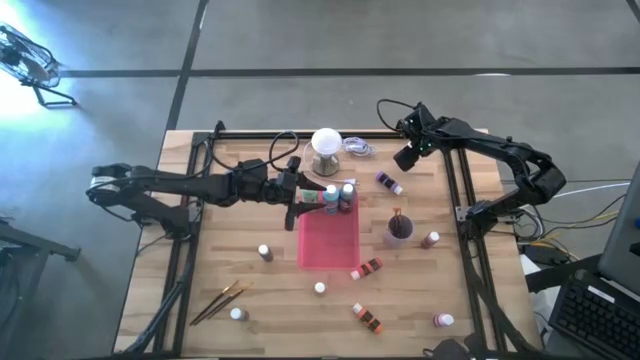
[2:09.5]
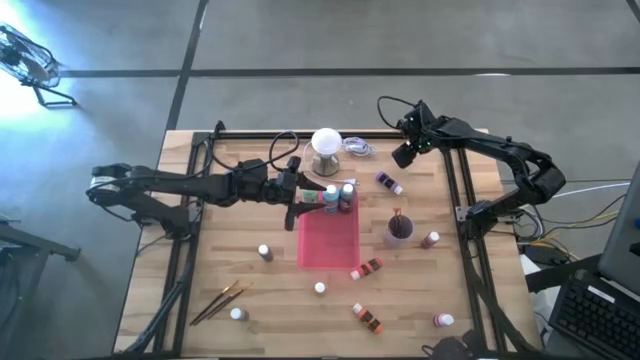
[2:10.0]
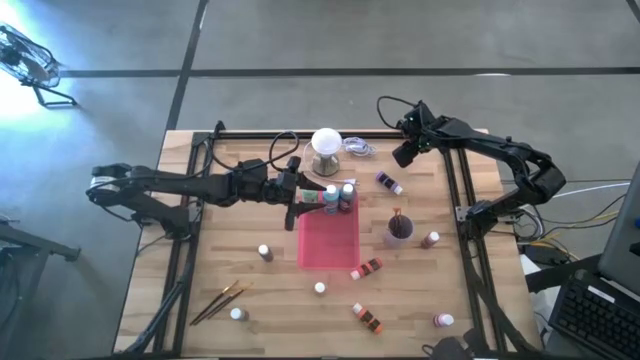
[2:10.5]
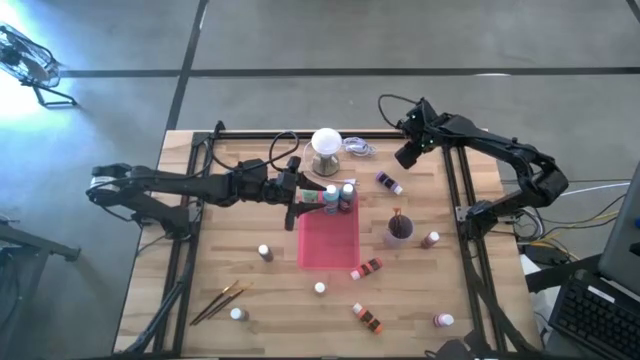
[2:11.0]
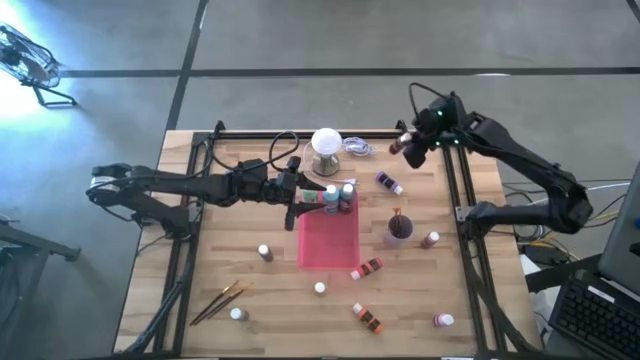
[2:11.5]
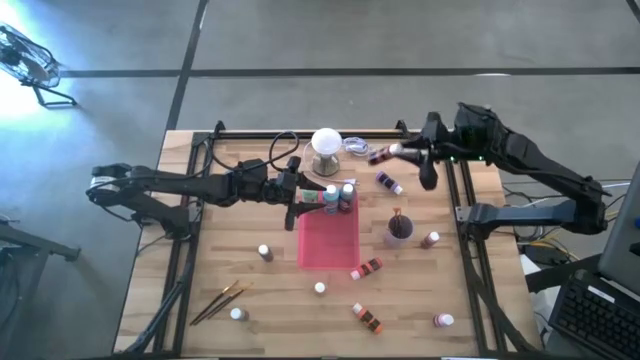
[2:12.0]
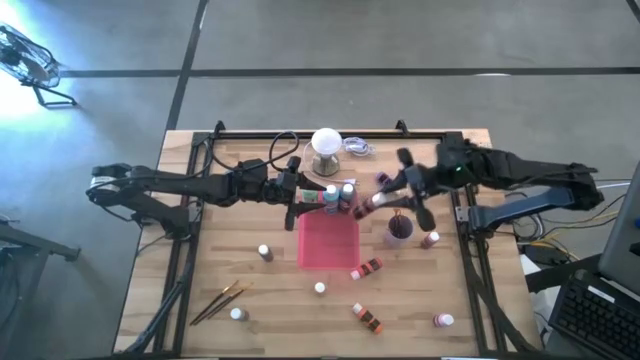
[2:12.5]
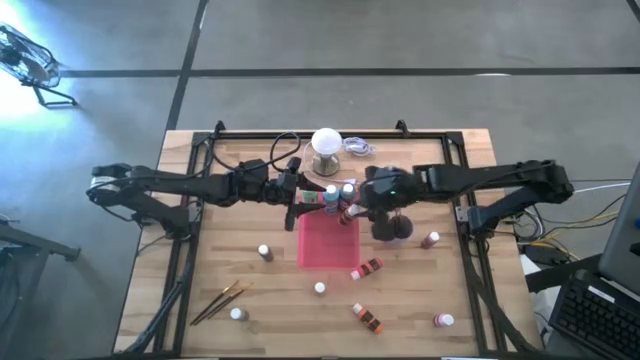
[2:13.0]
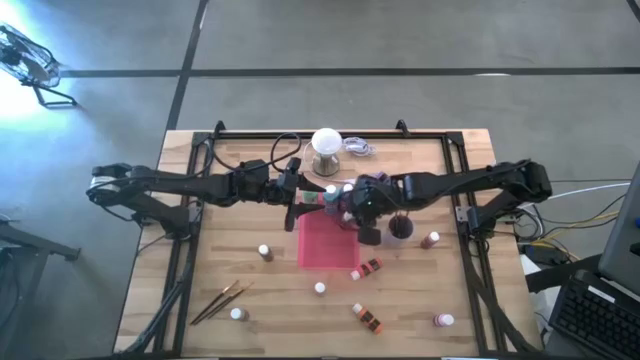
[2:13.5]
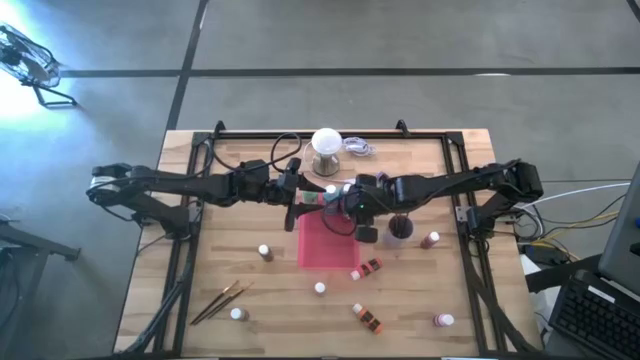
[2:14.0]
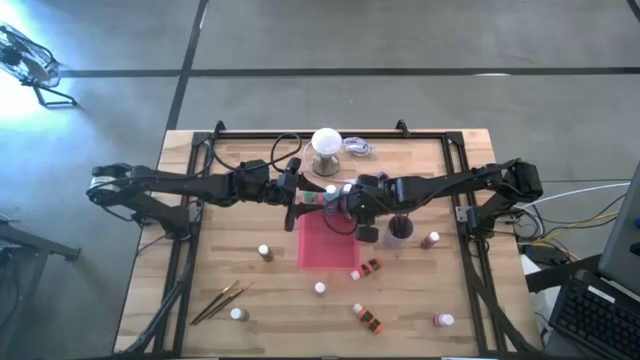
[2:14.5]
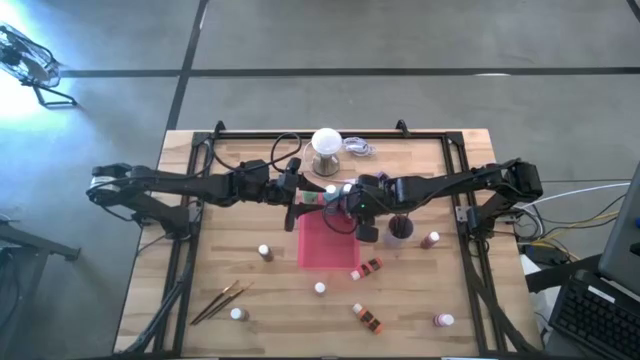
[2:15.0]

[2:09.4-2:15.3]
Task: Pick & Place Paint Supplies
Put the small red paint bottle into the red bin

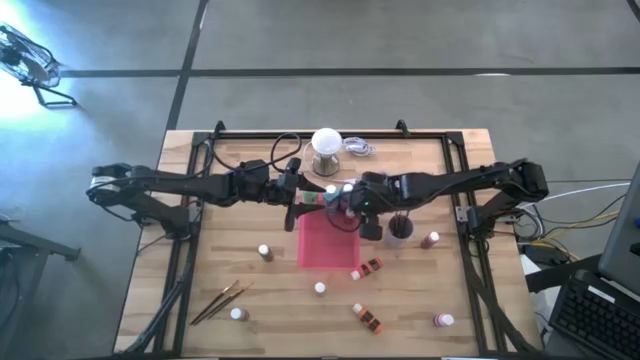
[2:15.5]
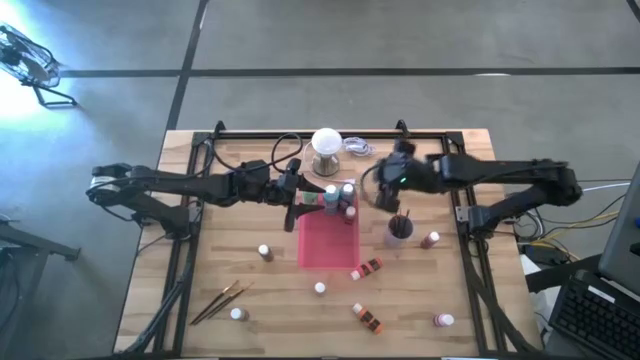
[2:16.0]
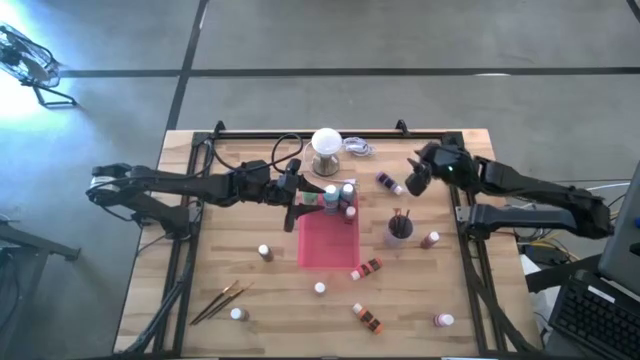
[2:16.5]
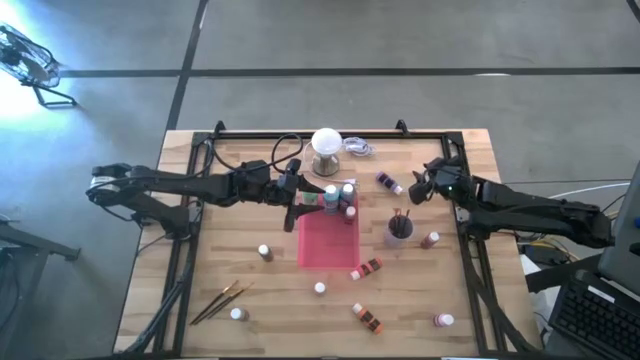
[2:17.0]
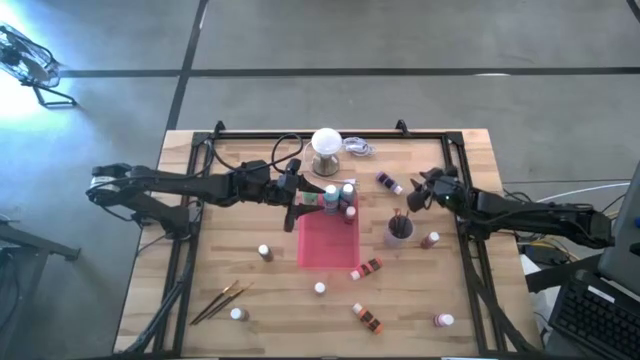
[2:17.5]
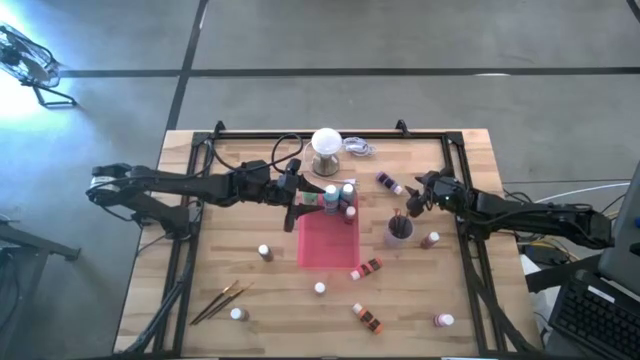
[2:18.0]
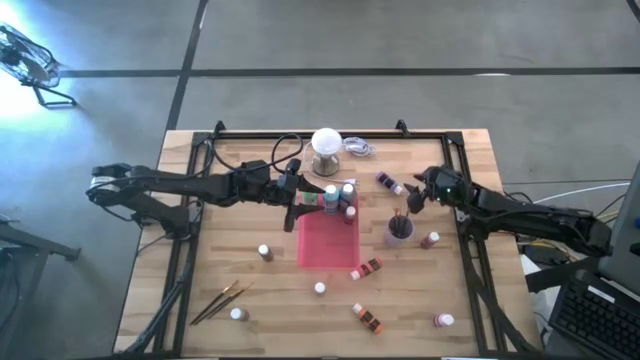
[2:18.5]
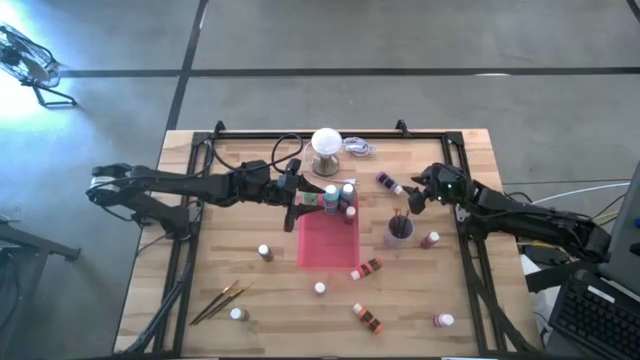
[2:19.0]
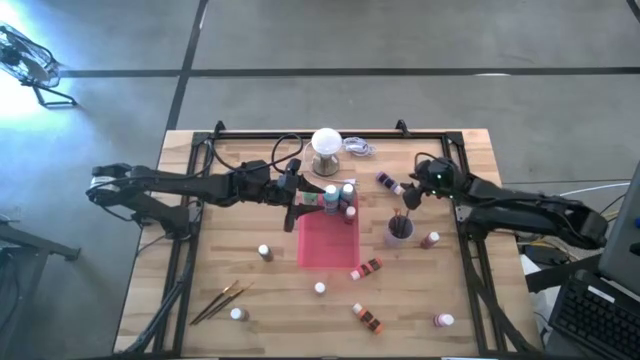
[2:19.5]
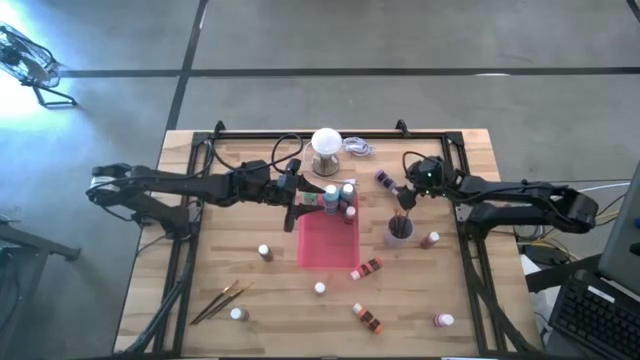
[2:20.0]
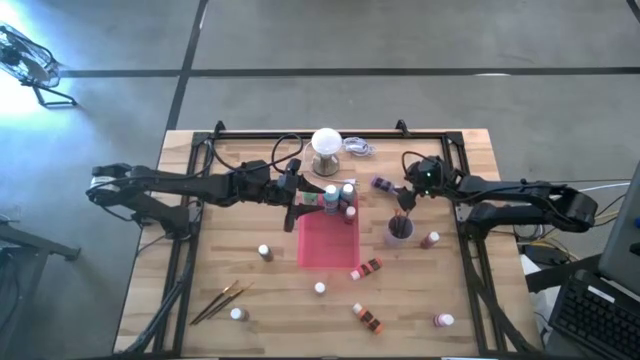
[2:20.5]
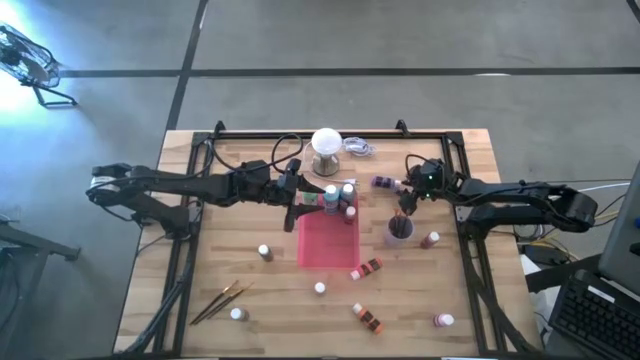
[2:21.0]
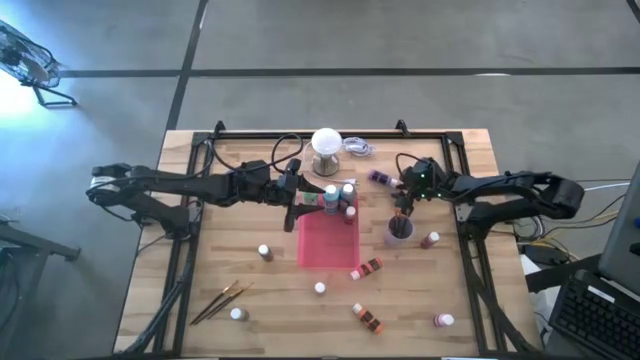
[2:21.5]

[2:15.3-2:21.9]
Put the small purple paint bottle into the red bin

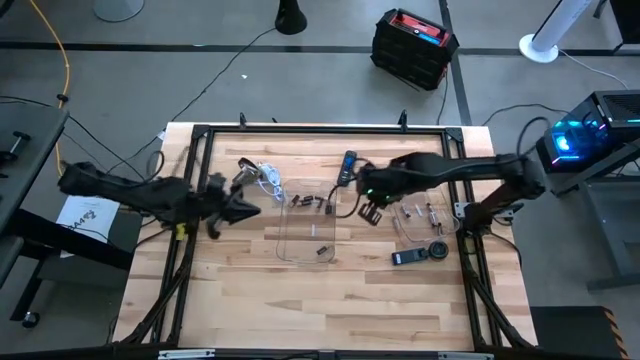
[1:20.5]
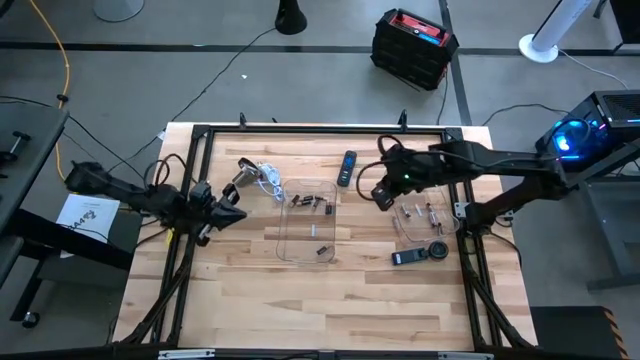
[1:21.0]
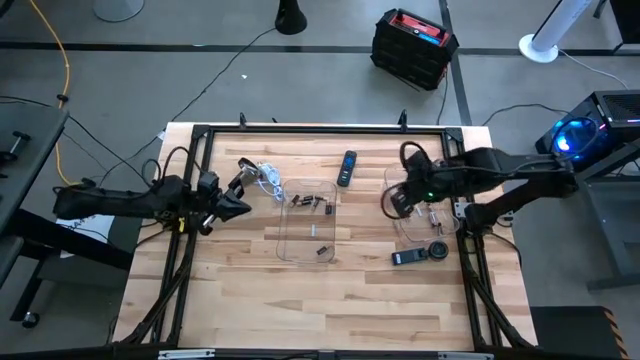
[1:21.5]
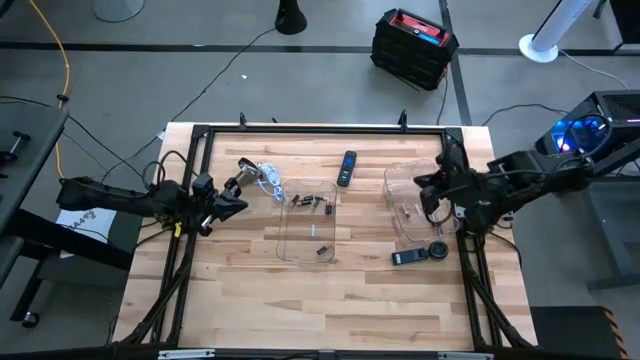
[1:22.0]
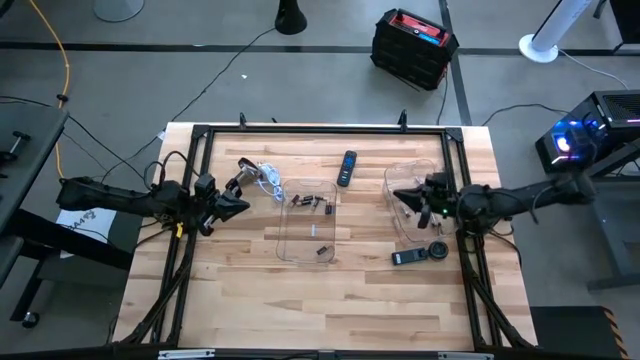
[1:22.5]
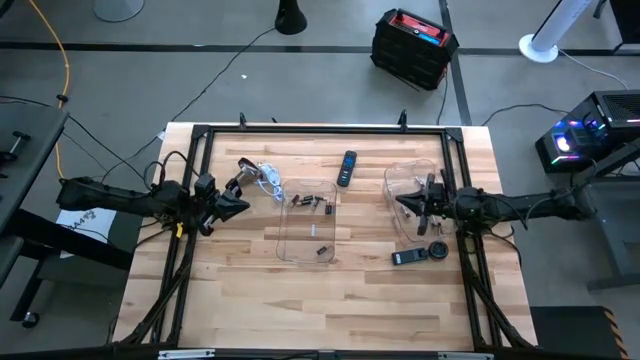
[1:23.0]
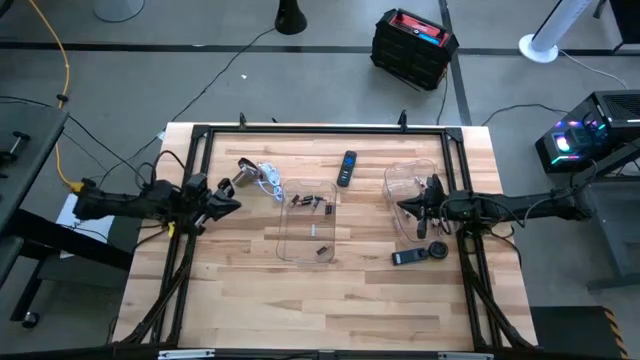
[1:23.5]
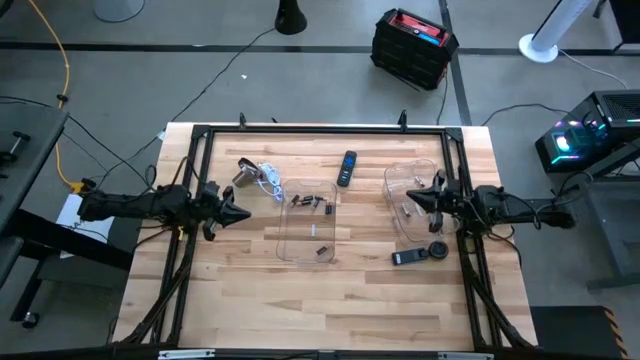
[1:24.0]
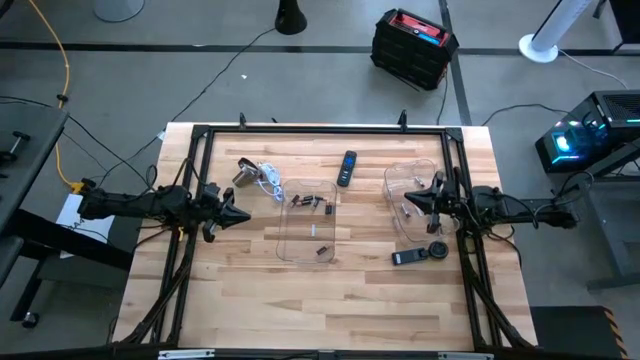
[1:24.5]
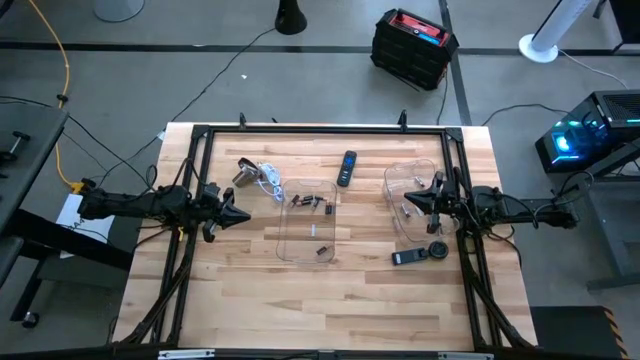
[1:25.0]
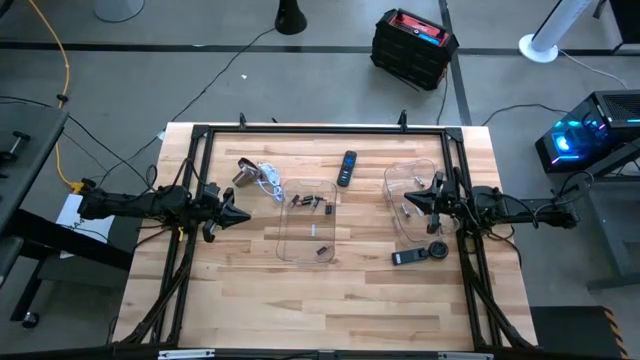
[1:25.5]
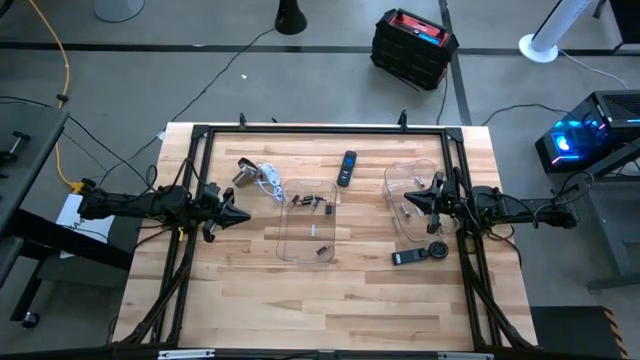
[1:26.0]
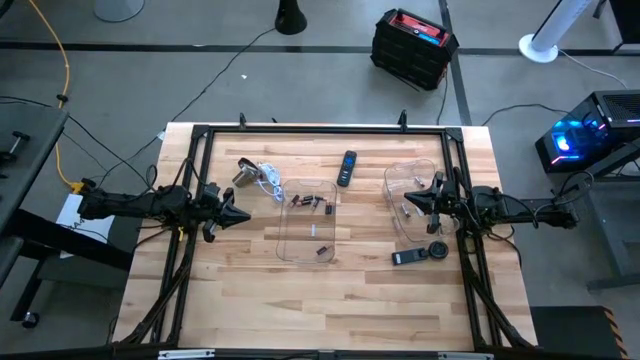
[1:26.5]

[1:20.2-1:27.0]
Task: Sort batteries
Return to Home Position
